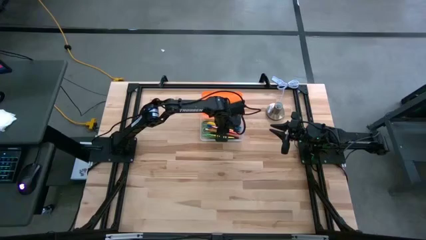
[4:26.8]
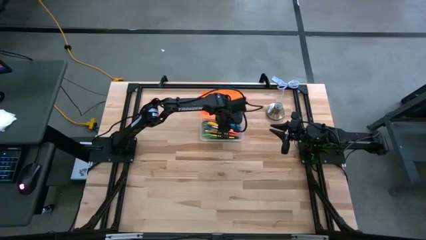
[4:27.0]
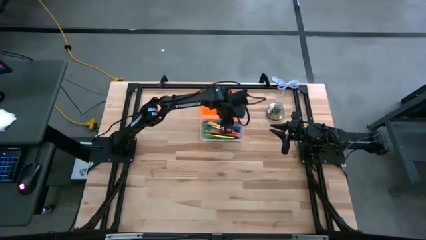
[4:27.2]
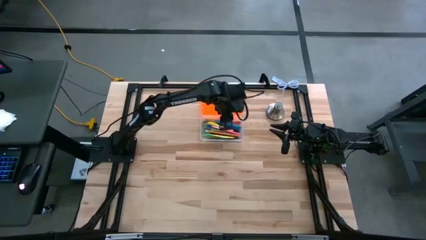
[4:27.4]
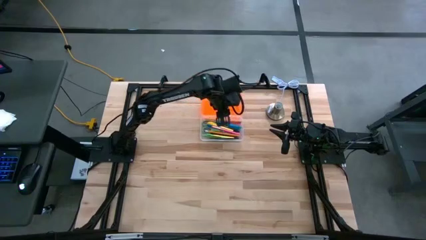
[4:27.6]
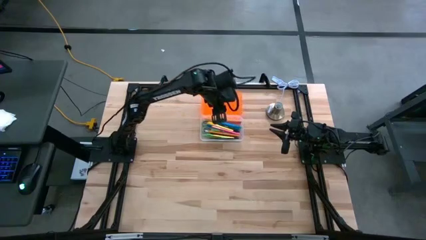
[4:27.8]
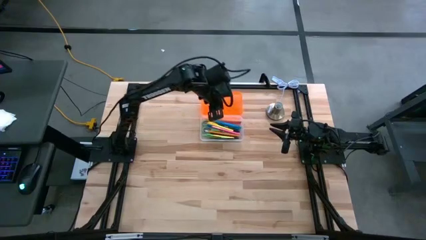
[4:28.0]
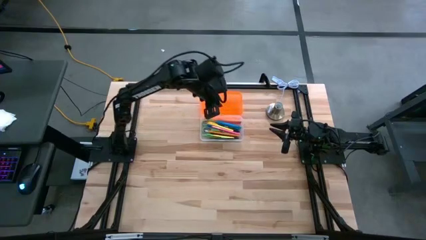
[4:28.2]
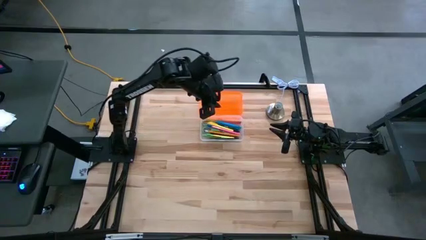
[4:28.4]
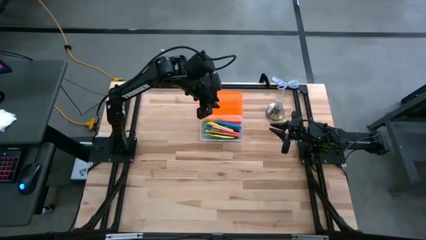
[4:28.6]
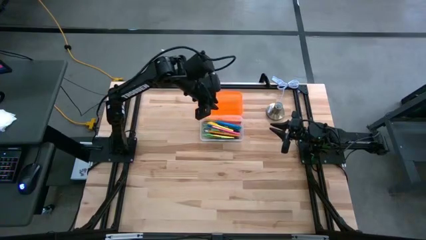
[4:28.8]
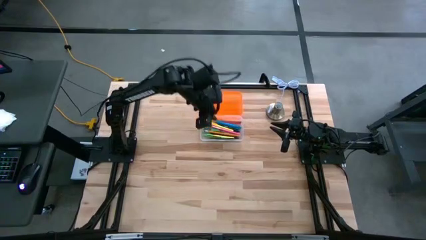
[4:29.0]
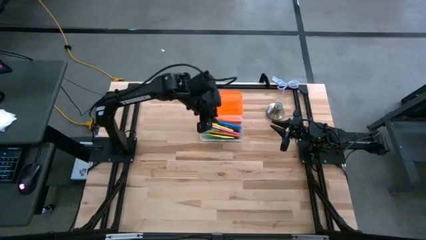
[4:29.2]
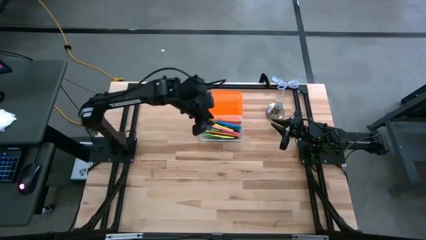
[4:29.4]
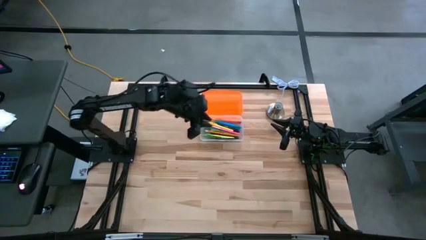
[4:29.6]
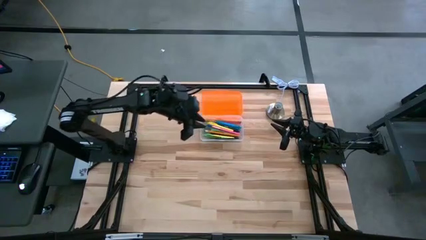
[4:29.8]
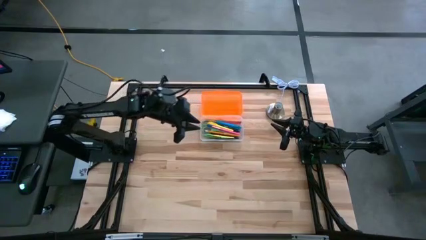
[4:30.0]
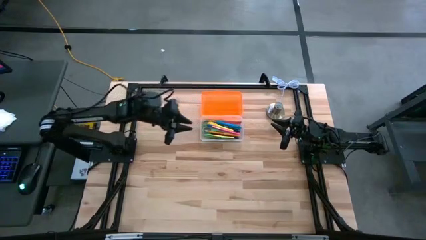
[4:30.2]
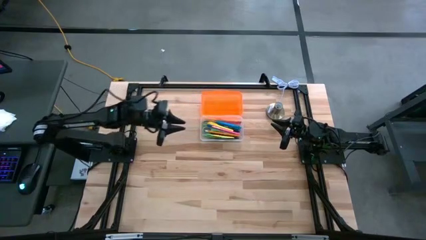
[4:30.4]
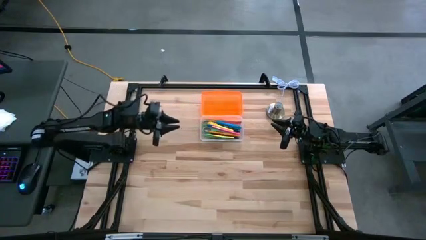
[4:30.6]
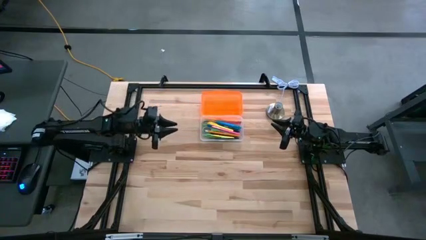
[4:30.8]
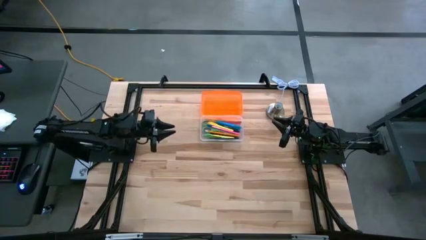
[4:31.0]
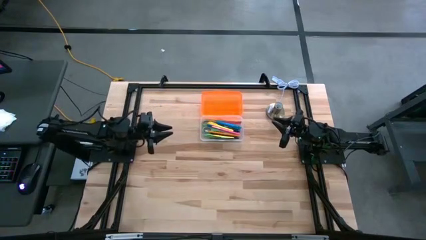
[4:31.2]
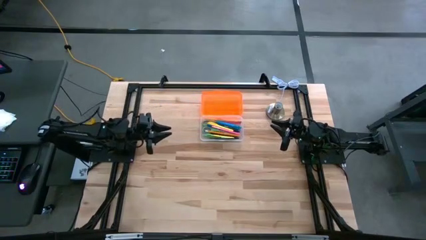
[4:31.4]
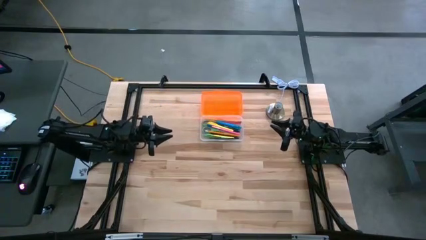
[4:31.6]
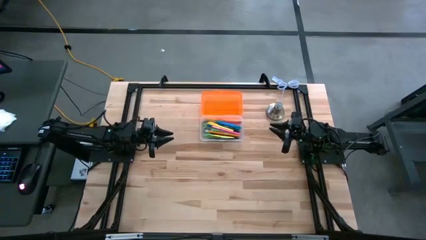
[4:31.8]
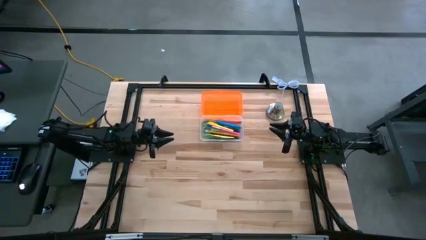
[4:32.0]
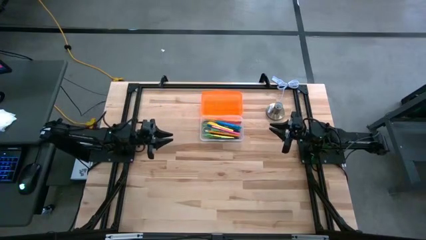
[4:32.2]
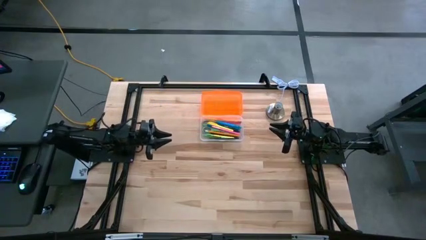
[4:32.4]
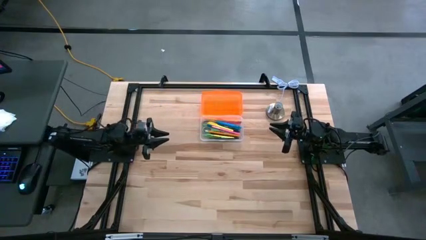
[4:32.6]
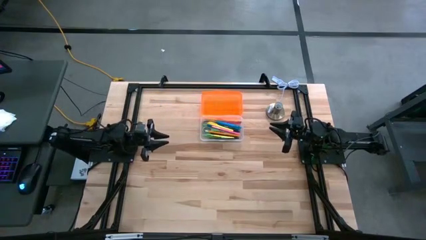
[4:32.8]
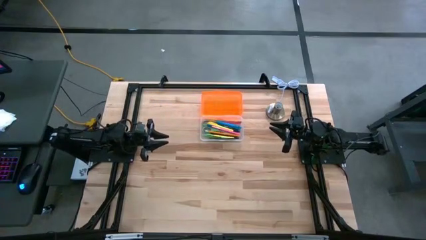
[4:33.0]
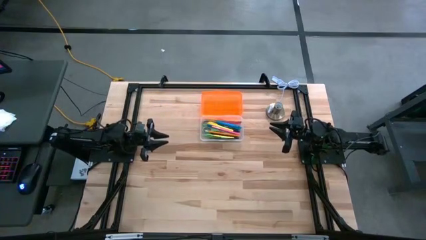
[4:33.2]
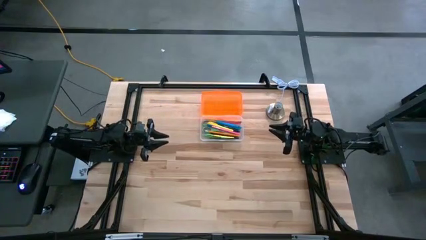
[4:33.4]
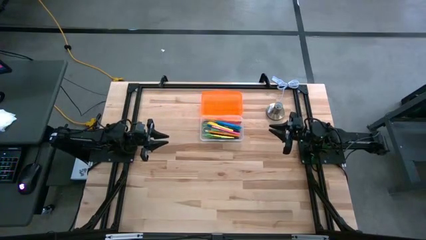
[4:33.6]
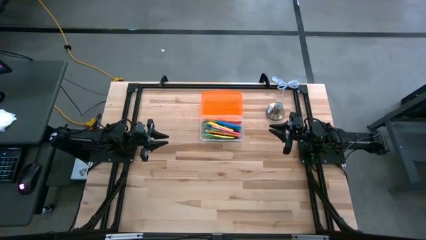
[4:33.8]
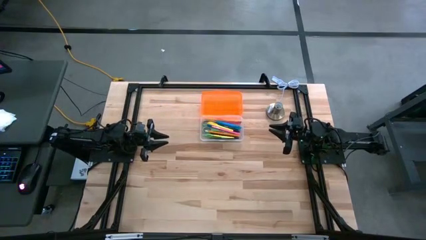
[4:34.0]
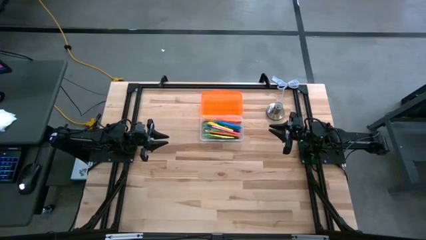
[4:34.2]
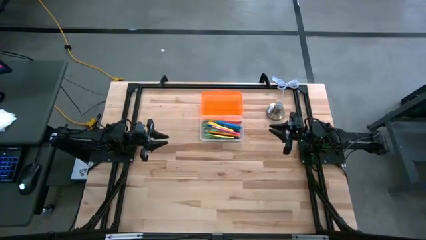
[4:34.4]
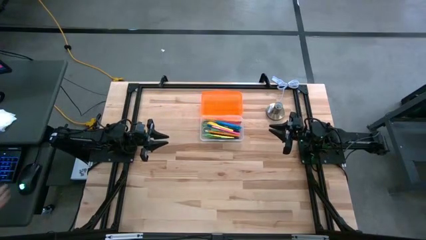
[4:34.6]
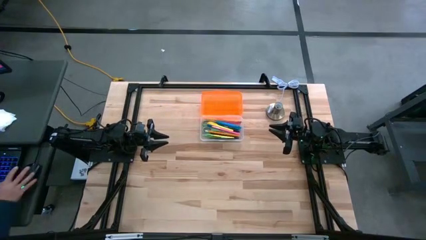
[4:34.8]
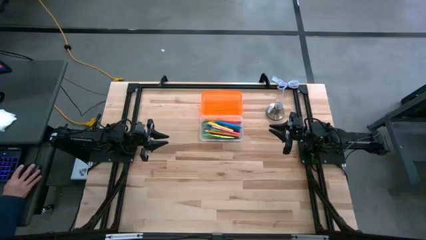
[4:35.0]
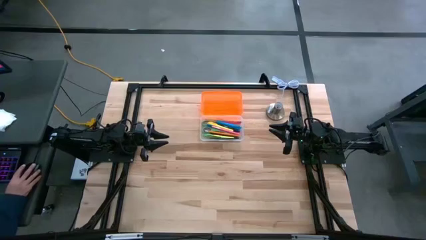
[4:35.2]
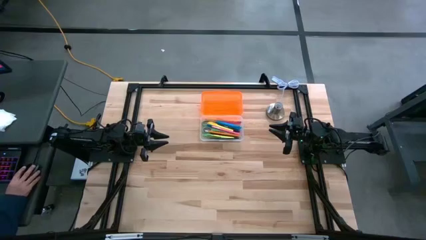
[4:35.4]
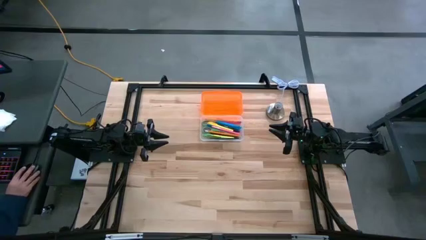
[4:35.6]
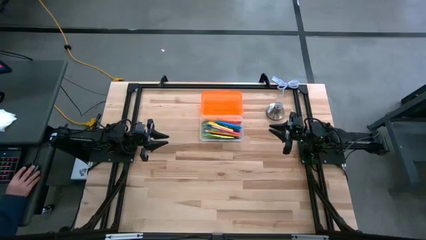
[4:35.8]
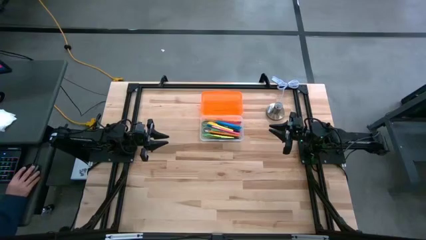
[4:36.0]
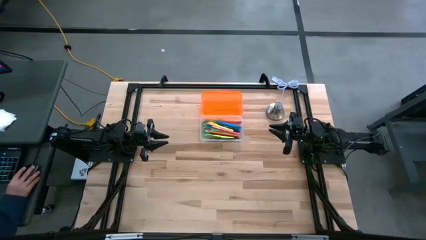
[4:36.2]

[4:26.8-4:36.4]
Task: Pick & place school supplies into a supply box
Return to Home Position

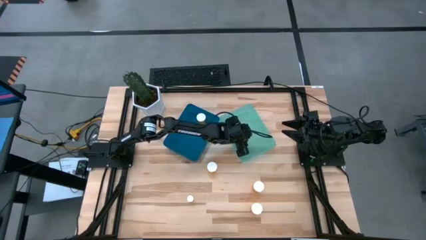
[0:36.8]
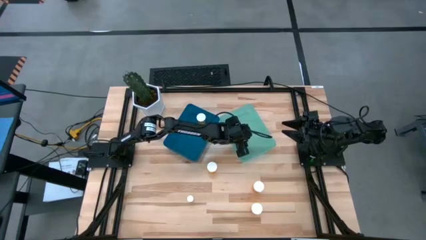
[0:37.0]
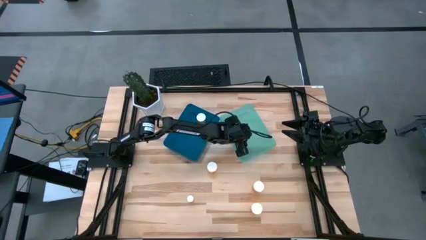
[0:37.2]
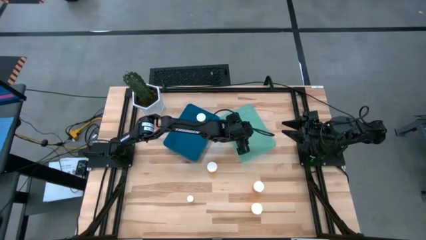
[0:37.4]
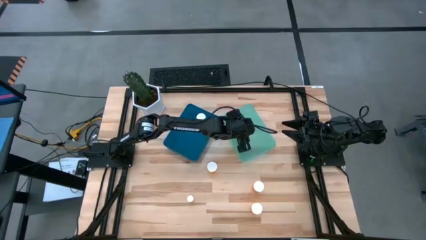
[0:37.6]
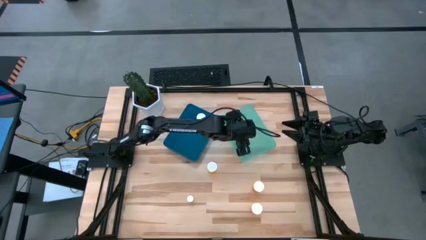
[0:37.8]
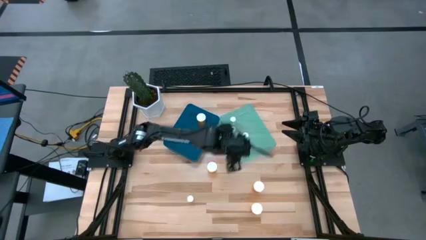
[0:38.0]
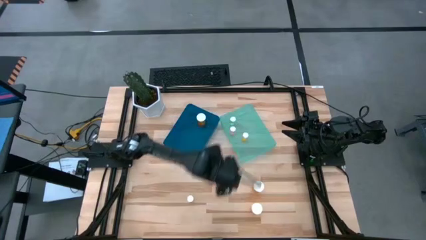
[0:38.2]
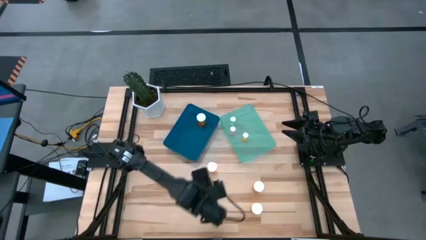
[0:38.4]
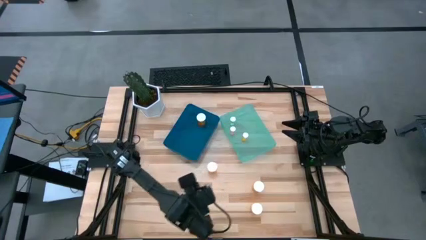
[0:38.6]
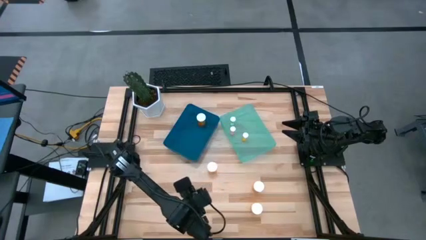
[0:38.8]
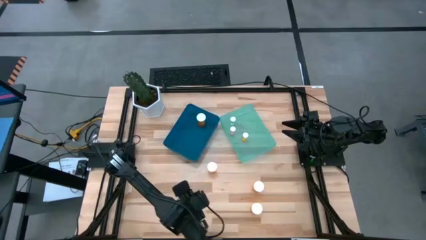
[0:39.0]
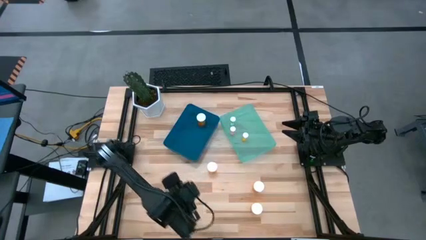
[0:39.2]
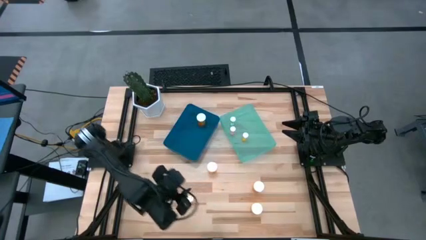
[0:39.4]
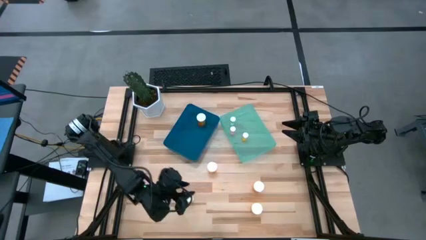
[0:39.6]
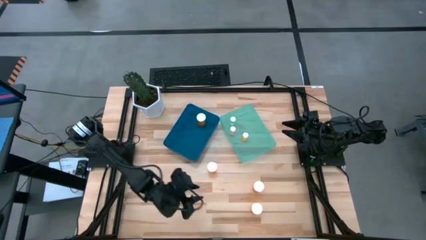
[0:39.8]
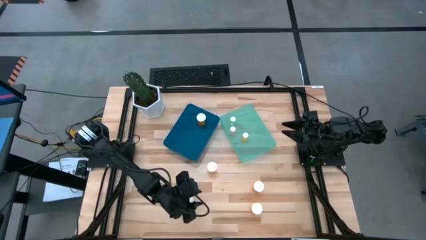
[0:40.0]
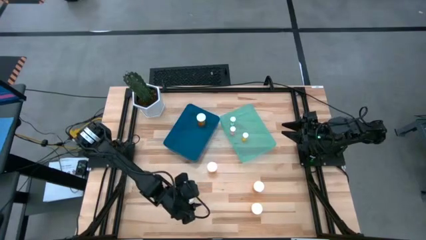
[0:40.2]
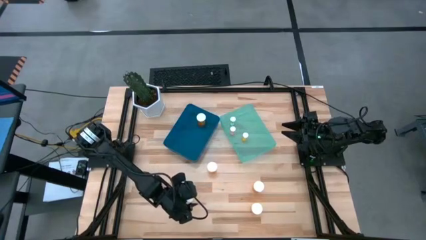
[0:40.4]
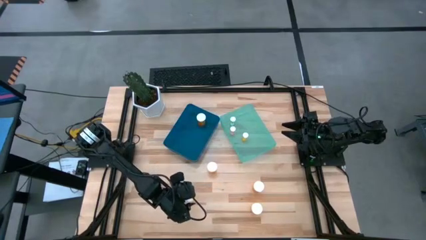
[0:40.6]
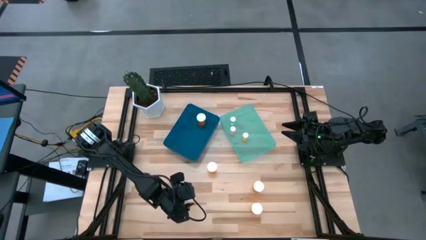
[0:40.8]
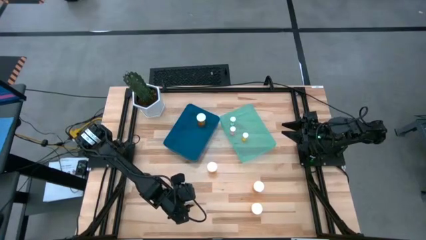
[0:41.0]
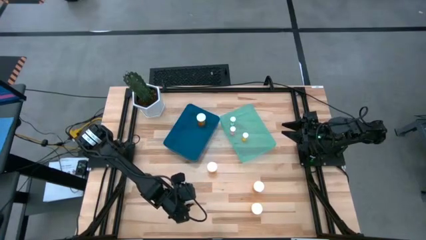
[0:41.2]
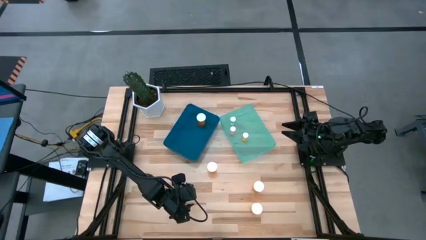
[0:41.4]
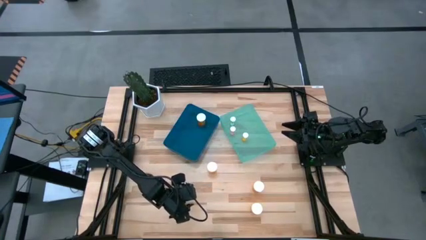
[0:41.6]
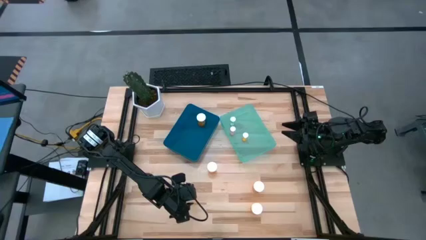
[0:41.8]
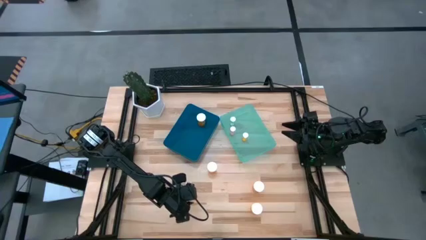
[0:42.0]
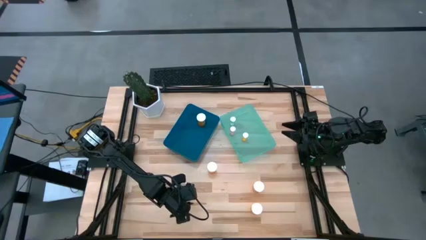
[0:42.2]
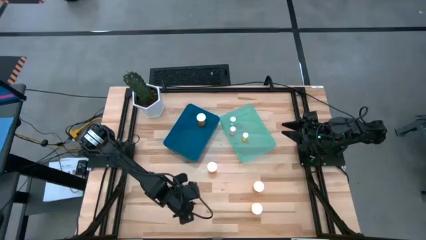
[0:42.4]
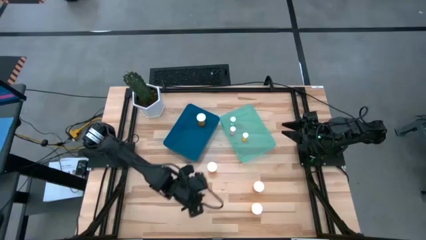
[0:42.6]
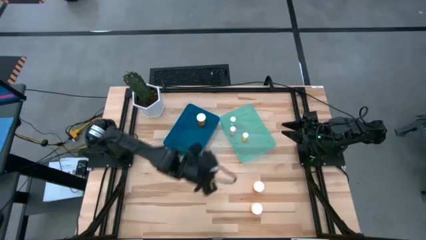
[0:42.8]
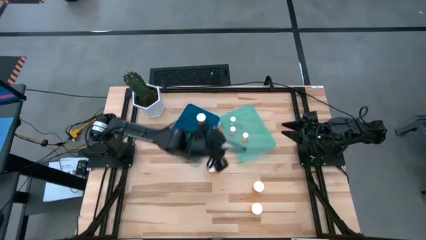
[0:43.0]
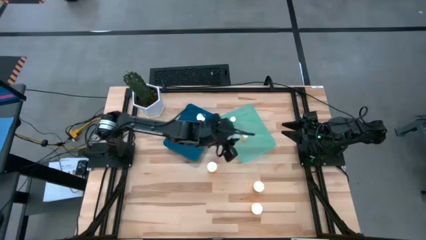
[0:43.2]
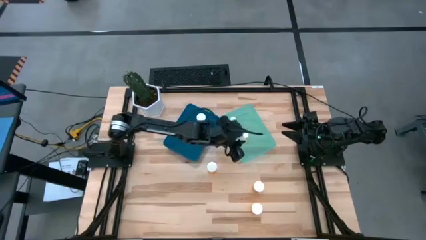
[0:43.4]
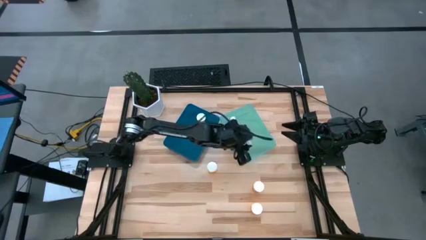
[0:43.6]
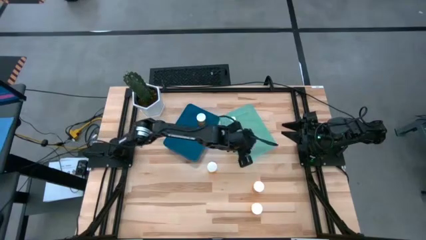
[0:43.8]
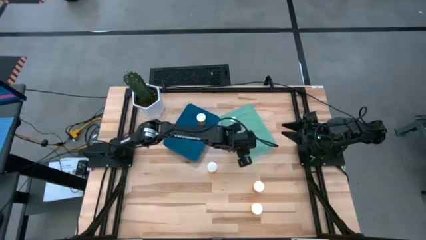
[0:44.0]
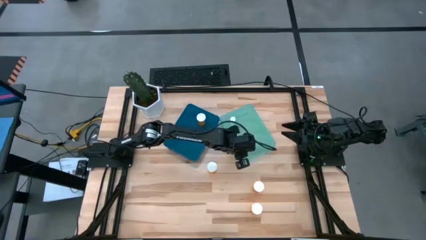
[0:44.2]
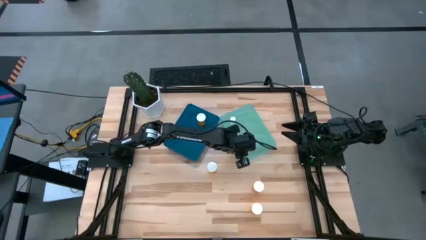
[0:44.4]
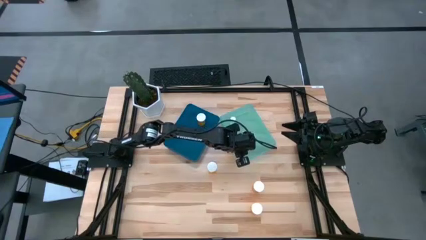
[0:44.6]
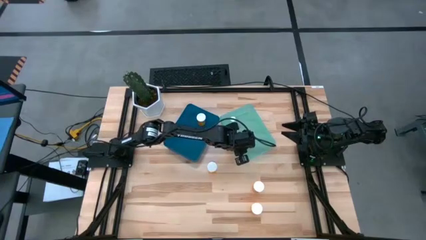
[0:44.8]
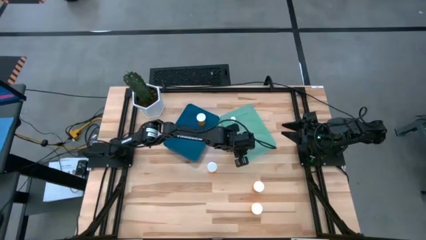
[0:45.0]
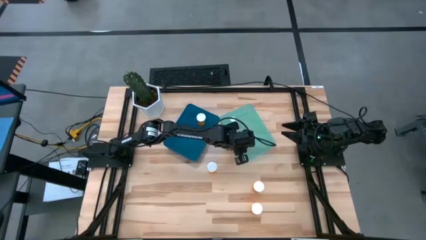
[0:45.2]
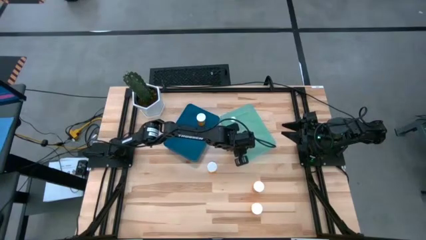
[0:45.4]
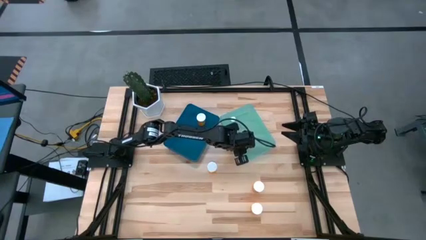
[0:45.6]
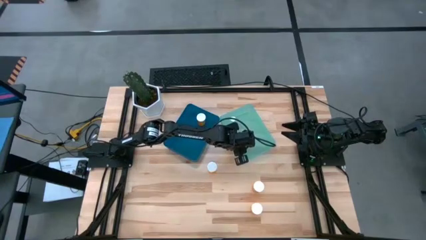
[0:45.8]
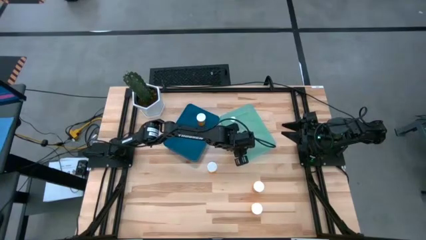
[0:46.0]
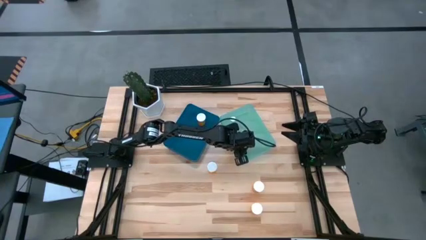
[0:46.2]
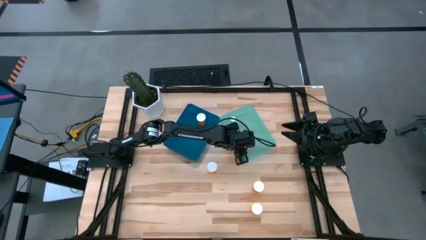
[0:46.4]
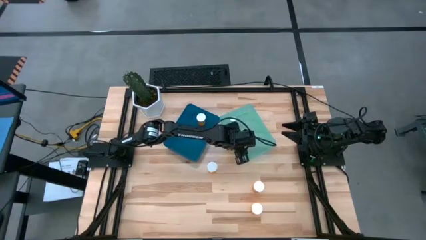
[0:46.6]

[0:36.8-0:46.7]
Task: Pick and place medicine bottles into bin by pill shape (circle, oval)
Put the yellow pill bottle into the green bin
